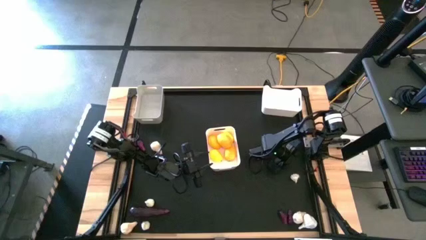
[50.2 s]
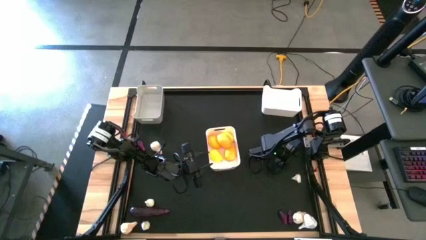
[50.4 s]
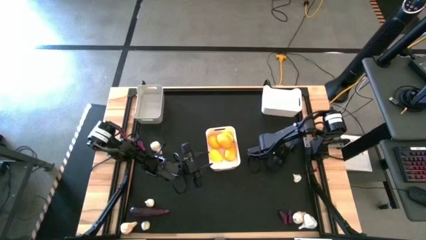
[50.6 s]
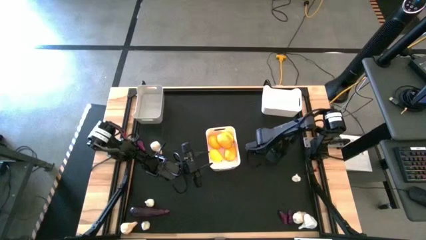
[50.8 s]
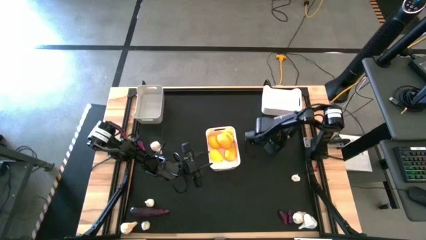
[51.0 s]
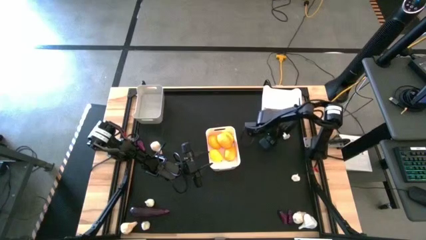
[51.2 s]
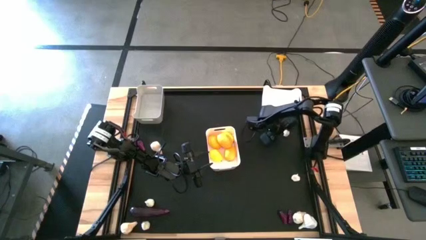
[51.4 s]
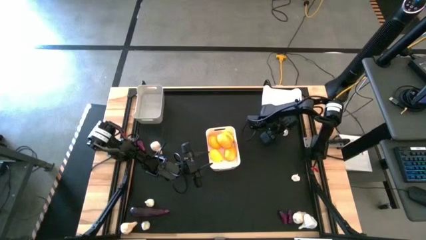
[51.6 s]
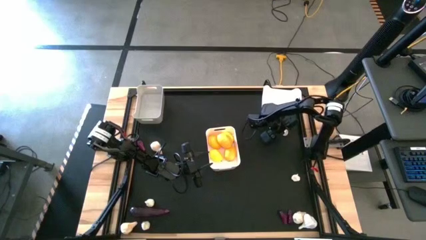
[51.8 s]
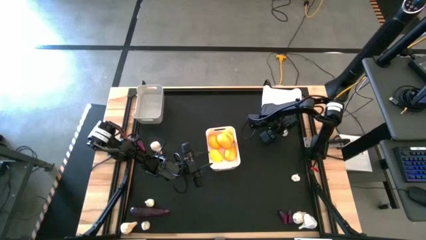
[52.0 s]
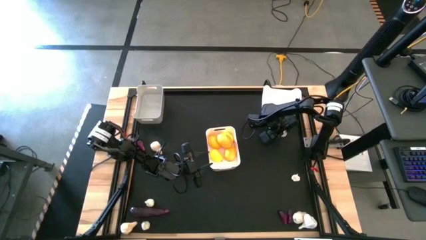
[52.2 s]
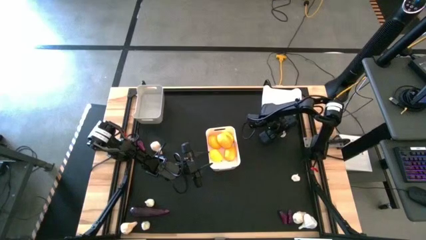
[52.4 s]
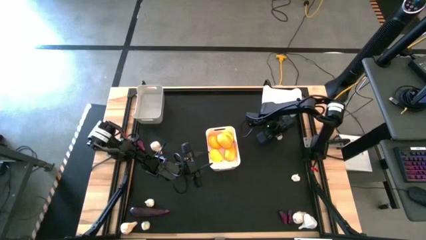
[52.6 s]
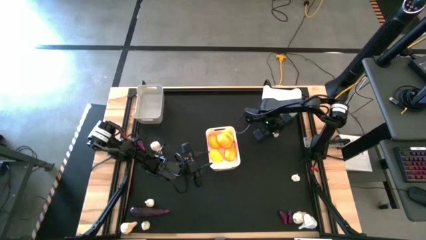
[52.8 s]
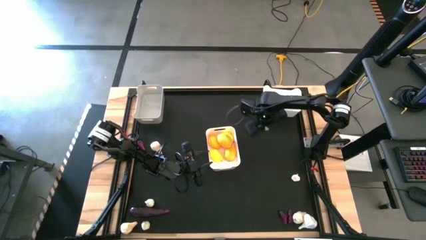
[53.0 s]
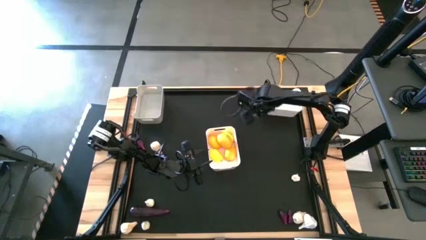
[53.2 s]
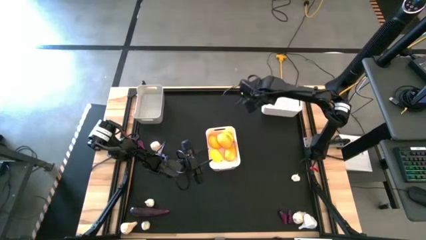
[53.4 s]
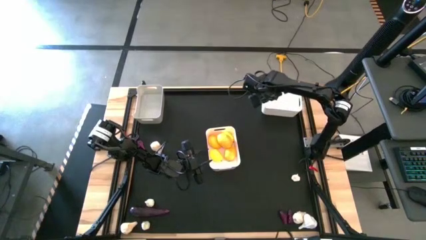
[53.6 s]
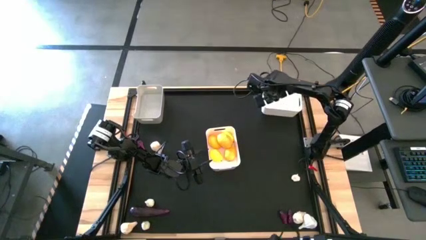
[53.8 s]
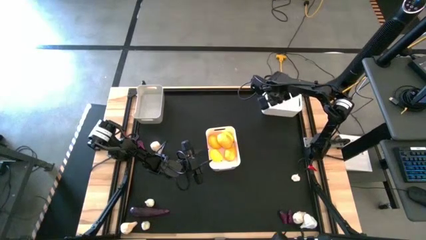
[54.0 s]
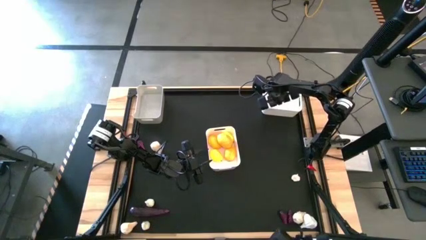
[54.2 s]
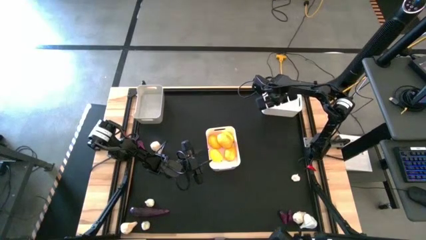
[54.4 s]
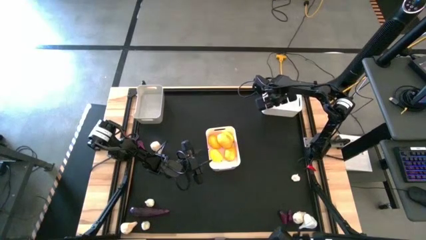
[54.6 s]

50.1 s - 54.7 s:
Task: Sort produce into baskets
Put the garlic into the top white bin

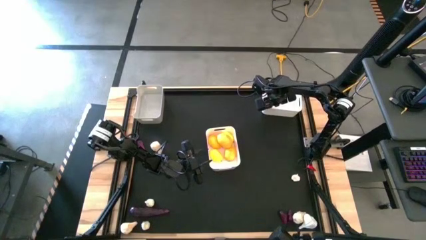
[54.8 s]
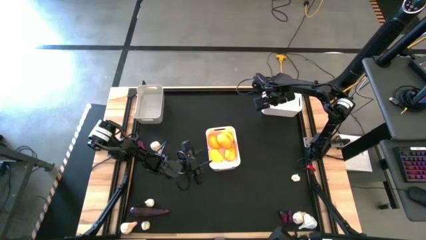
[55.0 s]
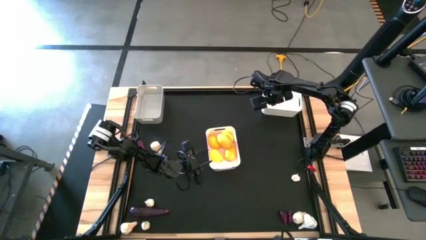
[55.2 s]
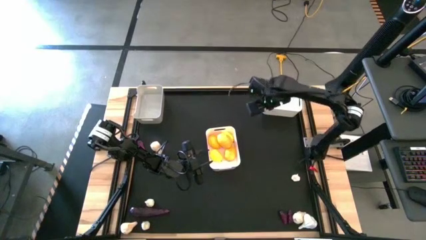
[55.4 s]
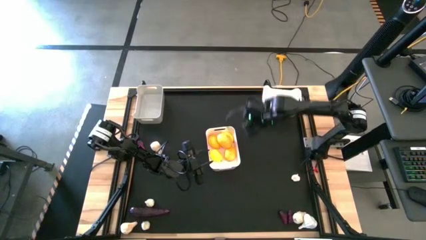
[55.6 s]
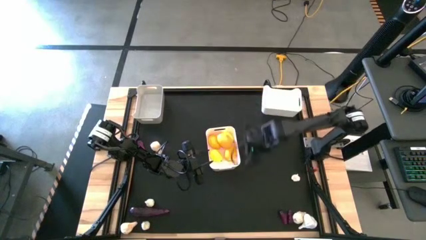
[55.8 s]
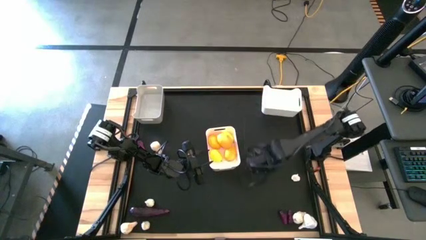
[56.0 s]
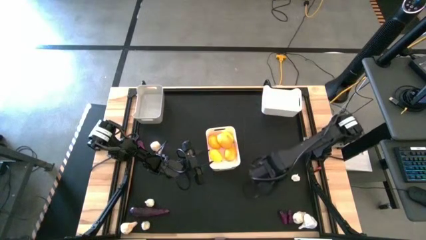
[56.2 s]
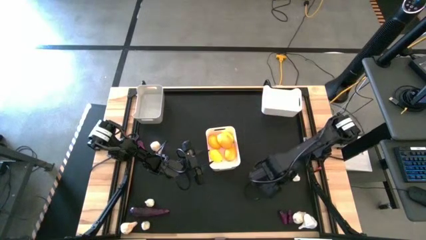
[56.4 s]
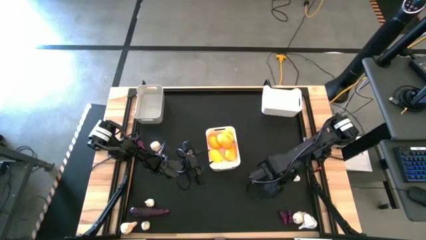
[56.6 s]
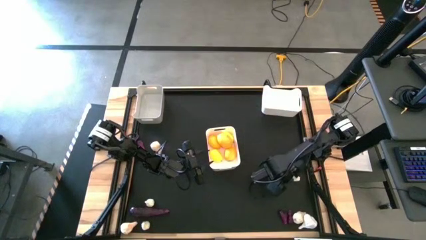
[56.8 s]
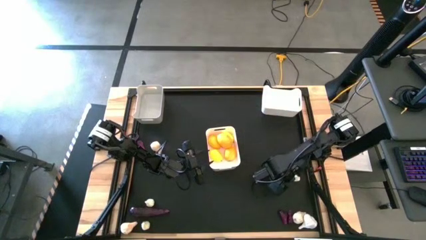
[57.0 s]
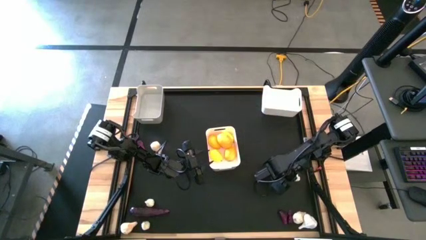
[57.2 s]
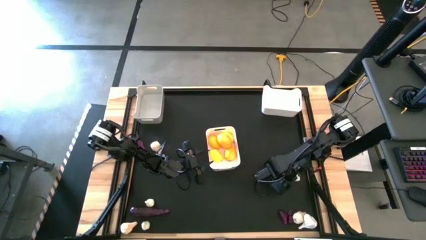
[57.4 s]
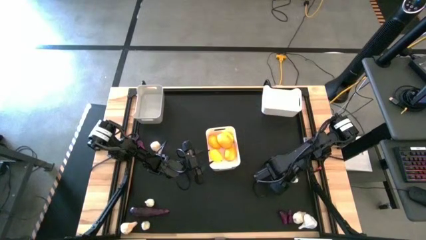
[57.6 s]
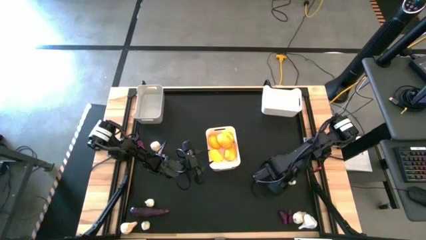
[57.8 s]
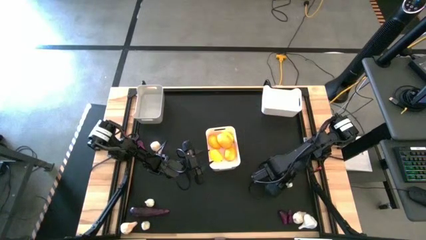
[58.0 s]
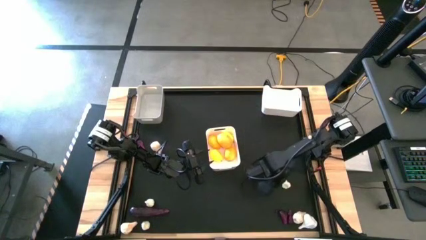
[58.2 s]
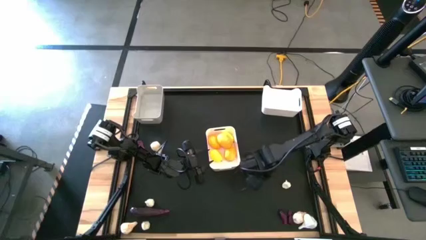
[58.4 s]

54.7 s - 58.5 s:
Put the garlic into the top white bin

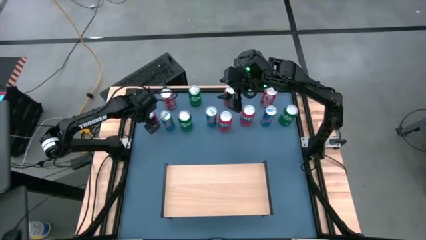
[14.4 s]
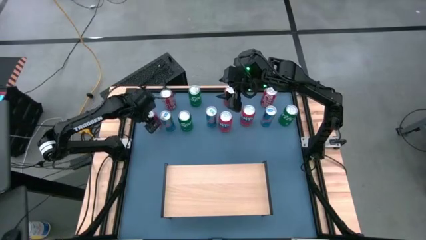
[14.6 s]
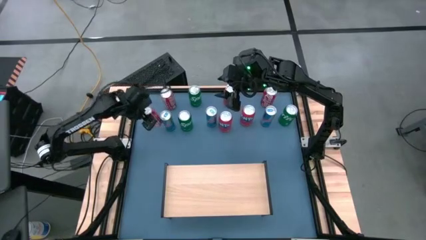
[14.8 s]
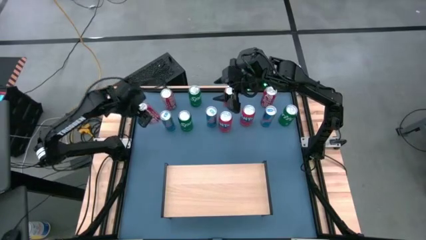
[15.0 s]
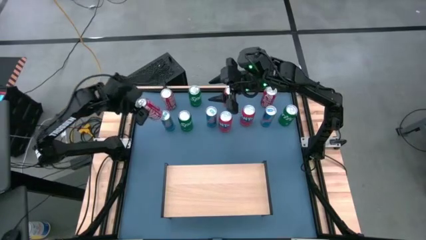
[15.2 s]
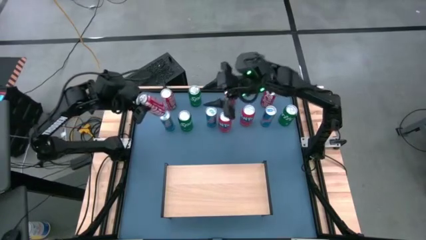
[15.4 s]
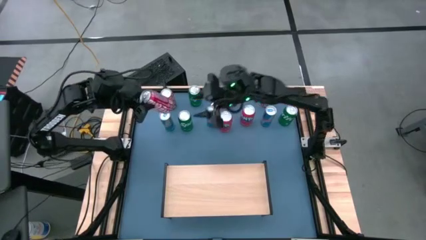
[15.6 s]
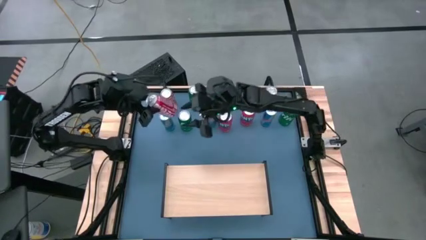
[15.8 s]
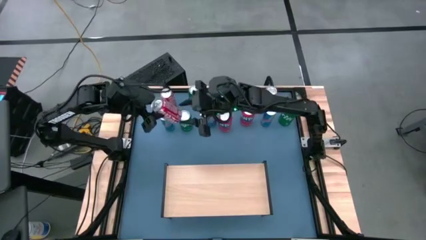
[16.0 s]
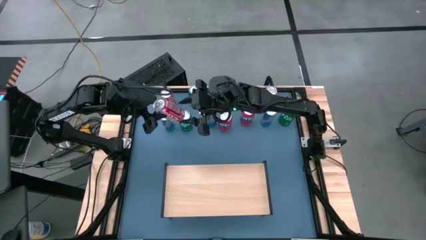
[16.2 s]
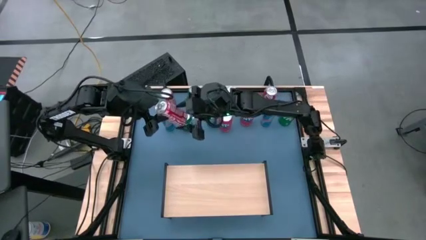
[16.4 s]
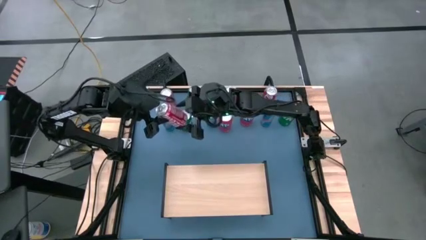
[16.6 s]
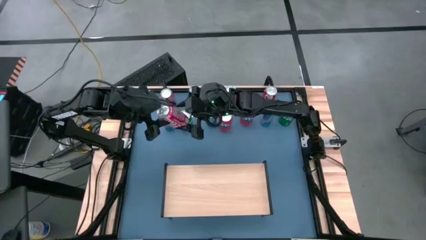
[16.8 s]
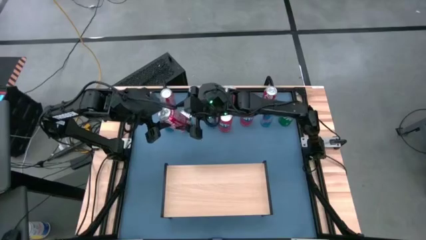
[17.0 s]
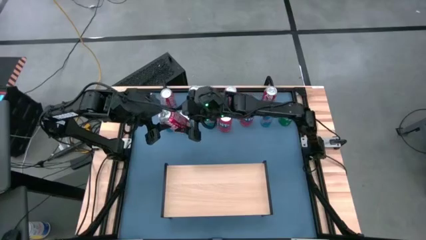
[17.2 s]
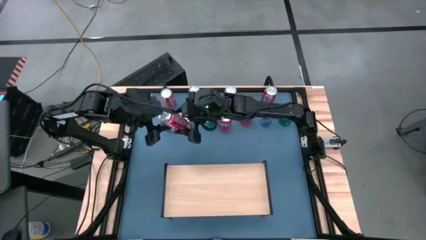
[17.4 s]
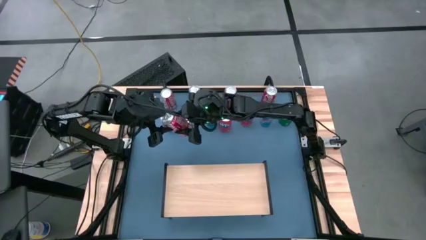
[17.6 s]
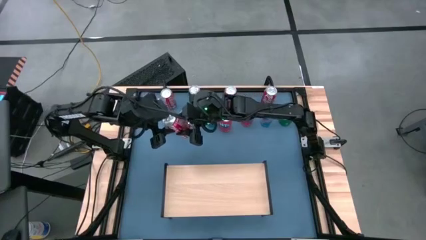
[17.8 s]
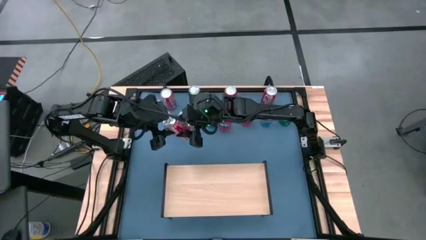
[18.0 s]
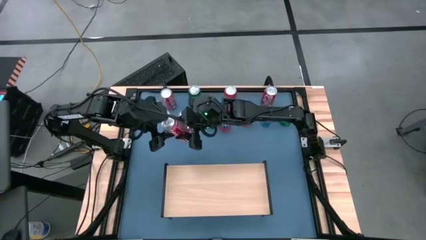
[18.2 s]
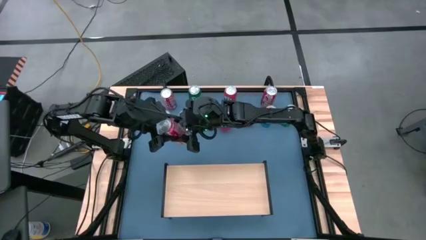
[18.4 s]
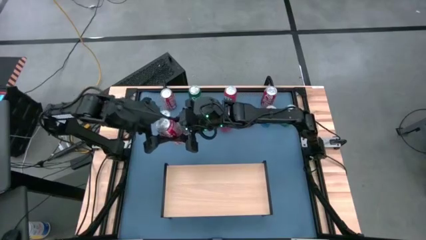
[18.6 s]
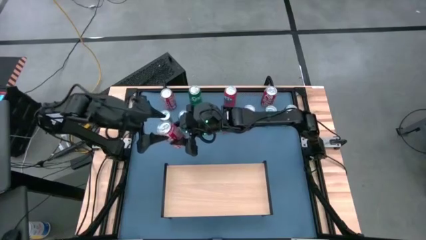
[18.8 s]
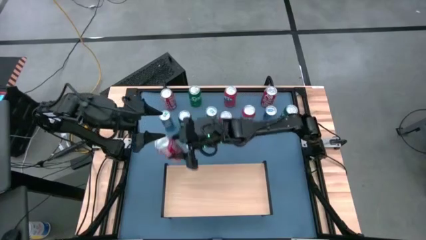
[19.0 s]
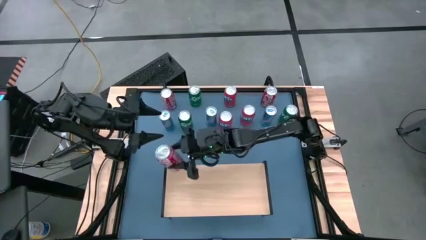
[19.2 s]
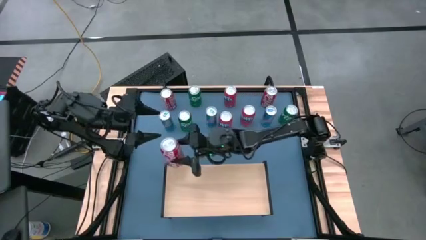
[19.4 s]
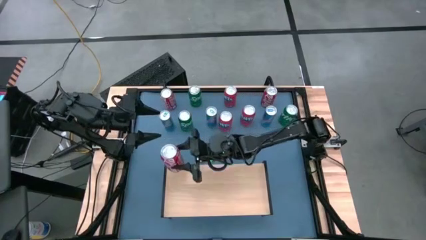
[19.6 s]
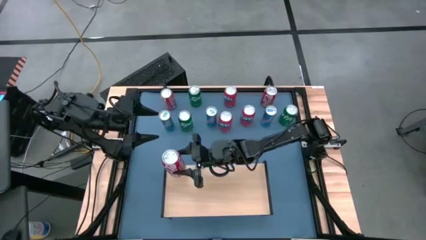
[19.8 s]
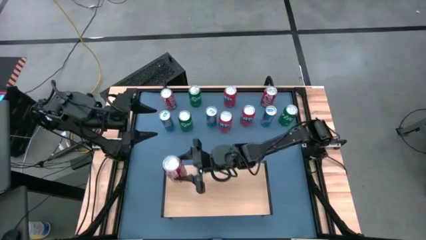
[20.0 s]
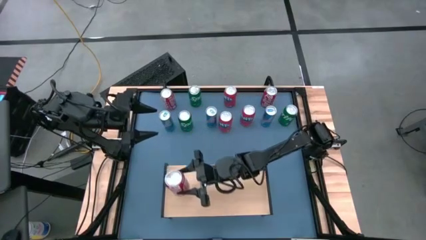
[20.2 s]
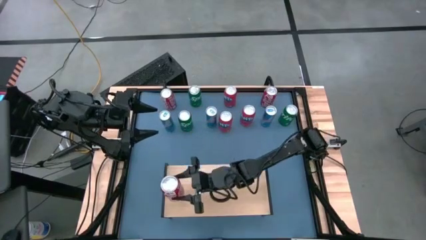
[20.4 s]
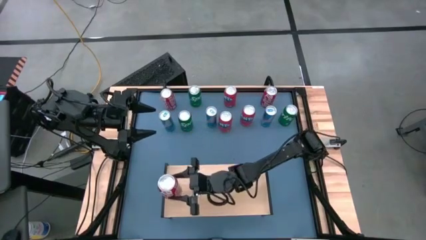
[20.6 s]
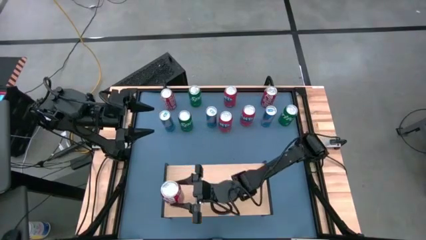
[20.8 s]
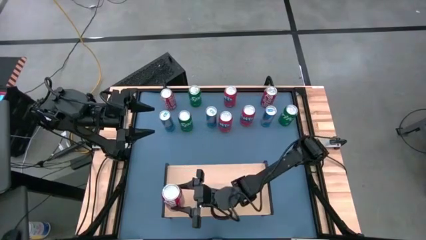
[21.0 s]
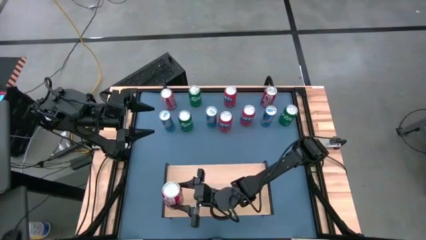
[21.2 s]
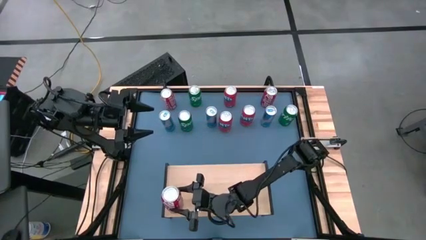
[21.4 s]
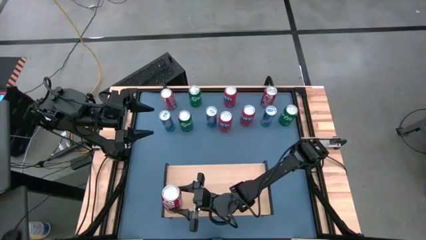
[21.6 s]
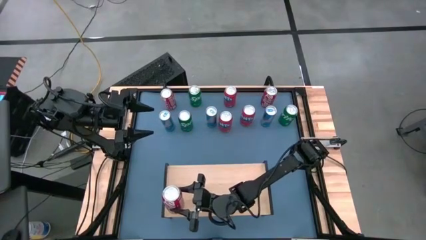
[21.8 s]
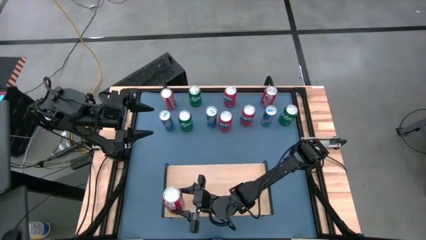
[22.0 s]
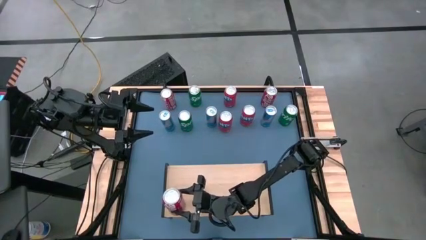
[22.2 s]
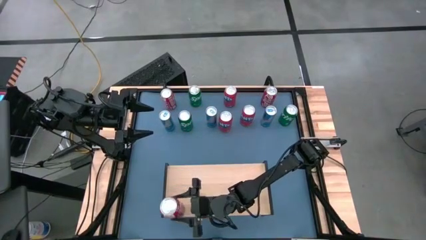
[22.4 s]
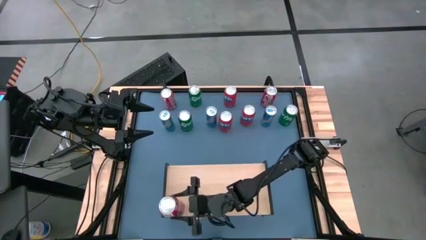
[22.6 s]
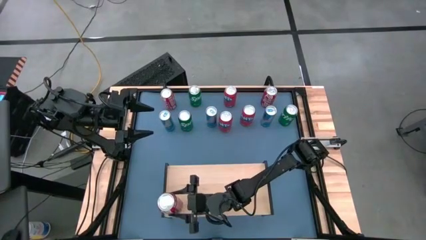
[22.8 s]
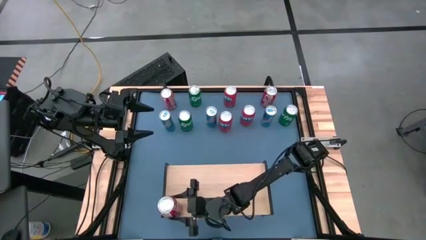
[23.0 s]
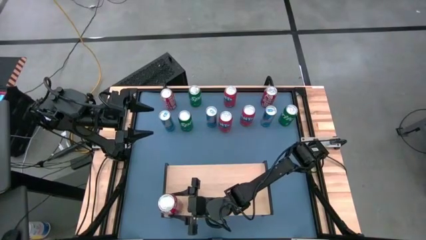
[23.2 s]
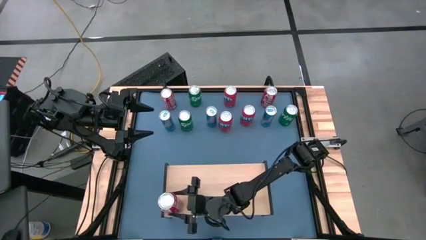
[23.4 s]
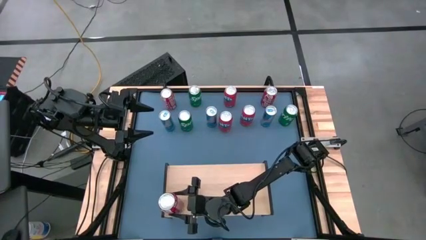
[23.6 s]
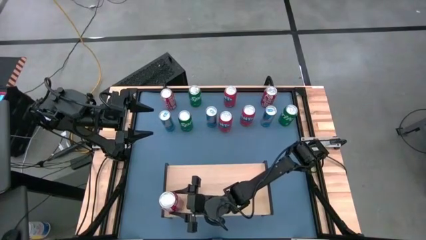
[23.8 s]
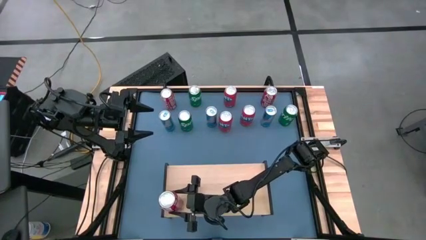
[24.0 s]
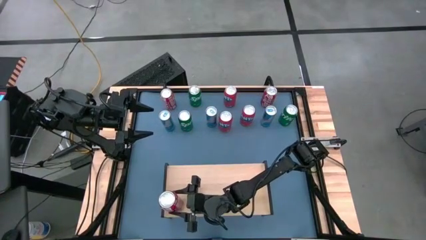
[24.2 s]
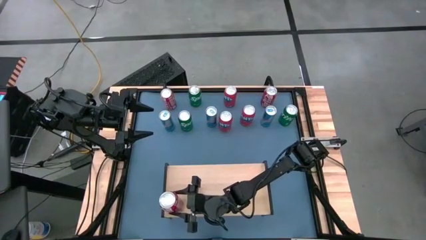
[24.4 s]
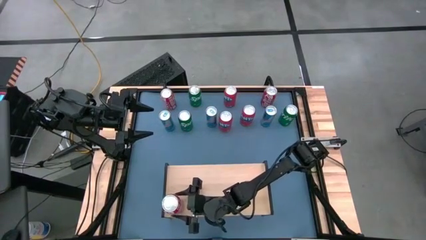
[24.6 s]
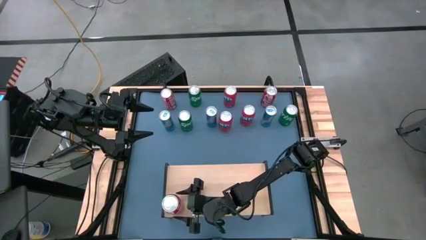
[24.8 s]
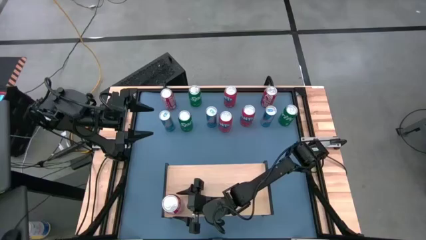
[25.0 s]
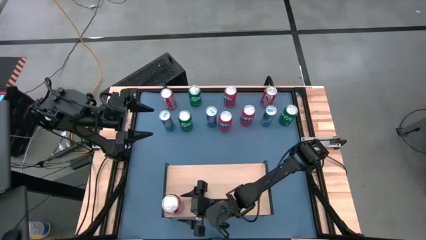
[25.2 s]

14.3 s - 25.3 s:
Task: Place canned beverage on shelf
Put the bottom red soda can on the shelf
